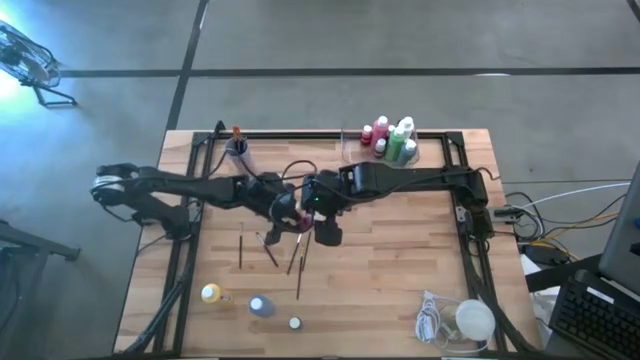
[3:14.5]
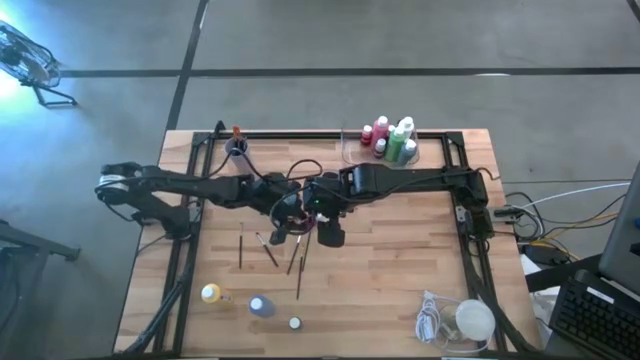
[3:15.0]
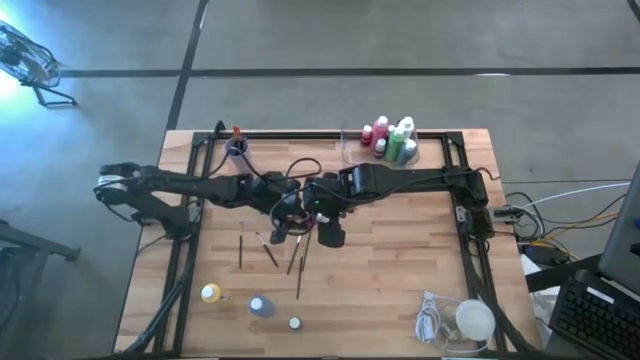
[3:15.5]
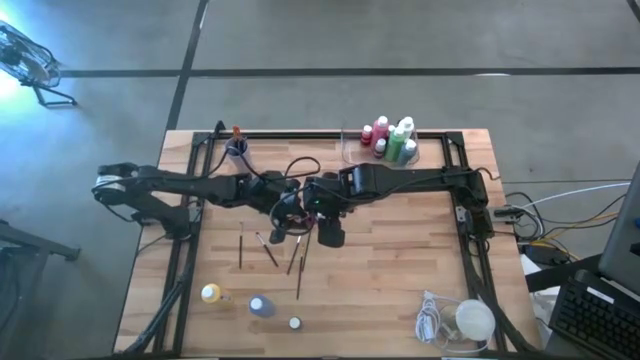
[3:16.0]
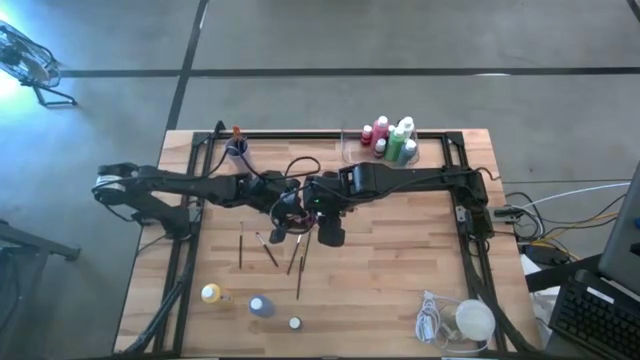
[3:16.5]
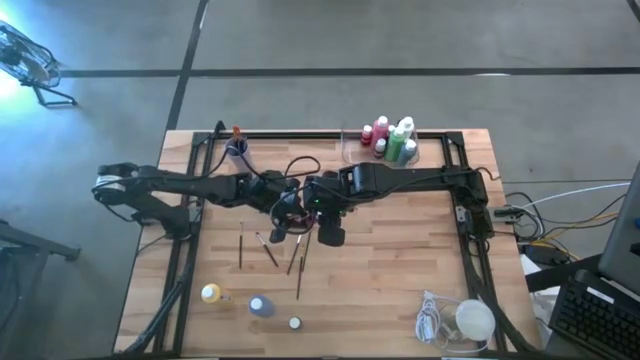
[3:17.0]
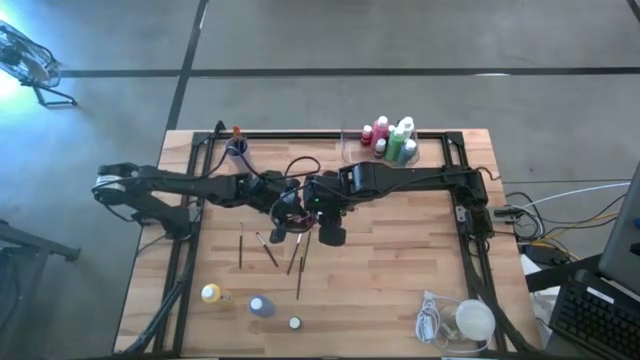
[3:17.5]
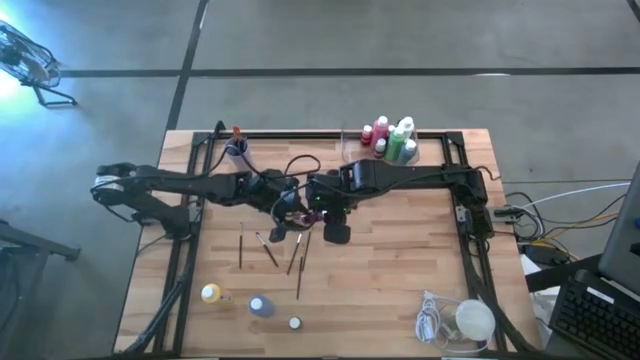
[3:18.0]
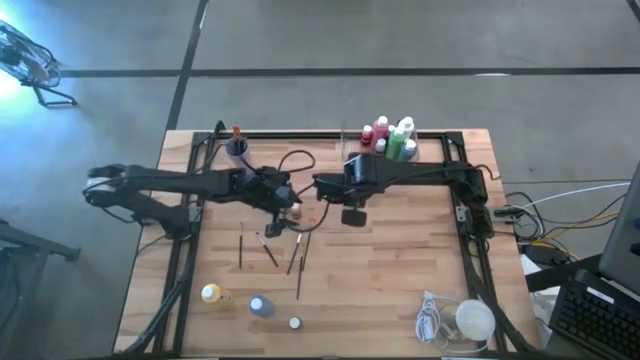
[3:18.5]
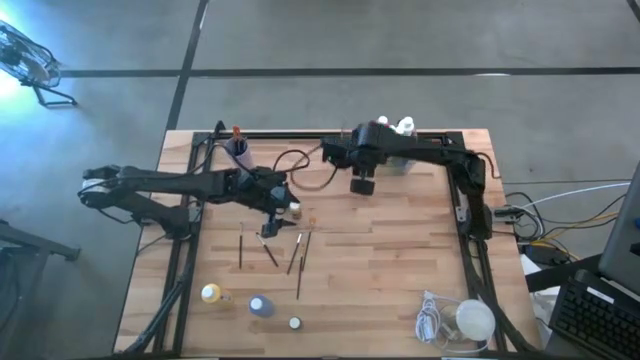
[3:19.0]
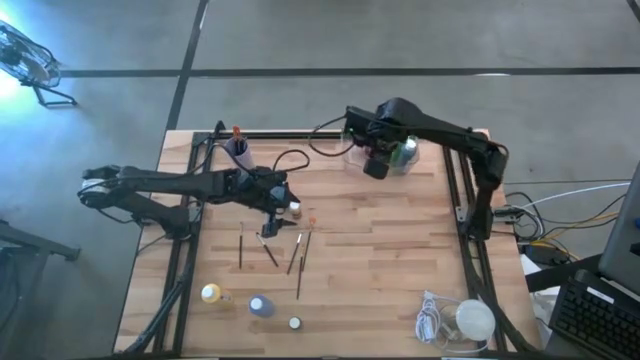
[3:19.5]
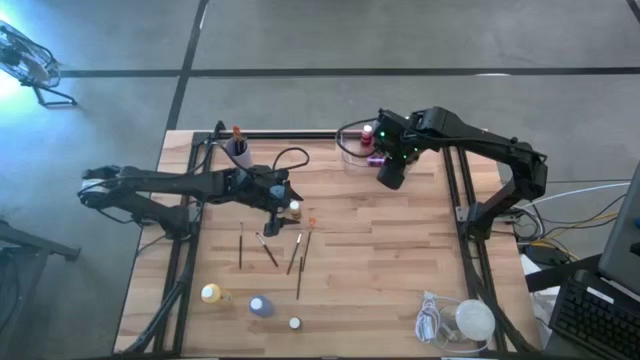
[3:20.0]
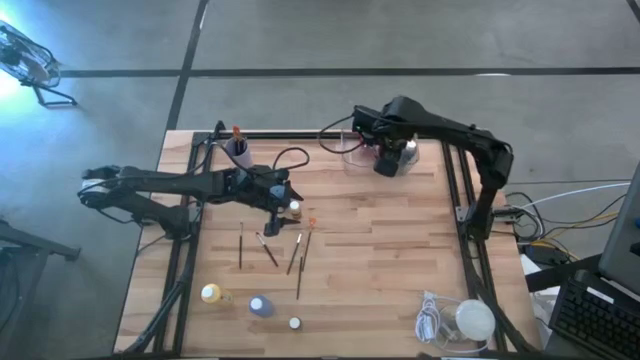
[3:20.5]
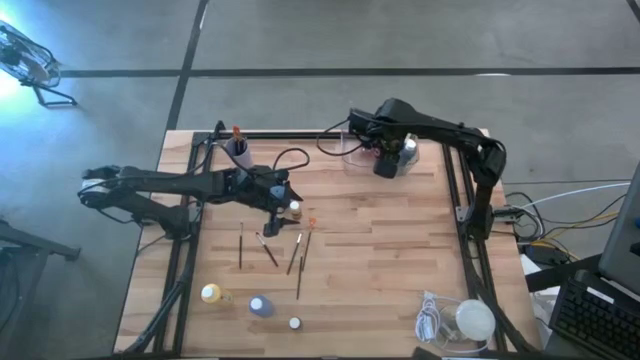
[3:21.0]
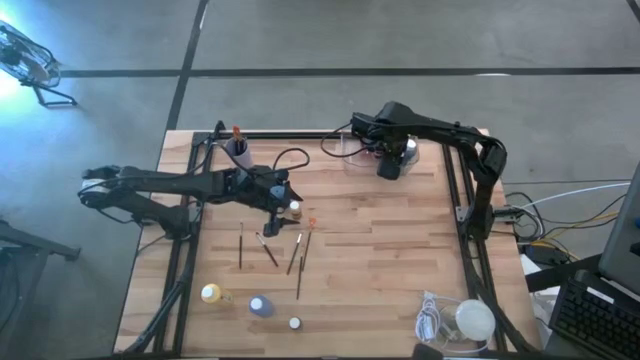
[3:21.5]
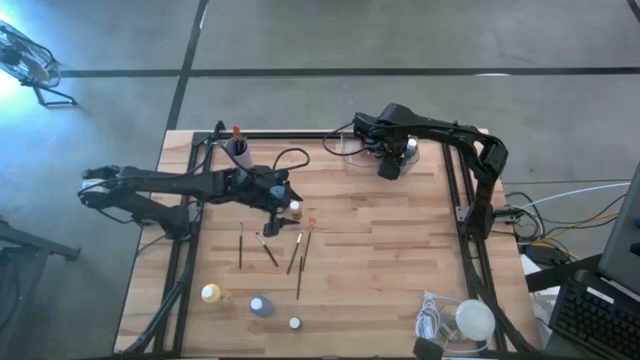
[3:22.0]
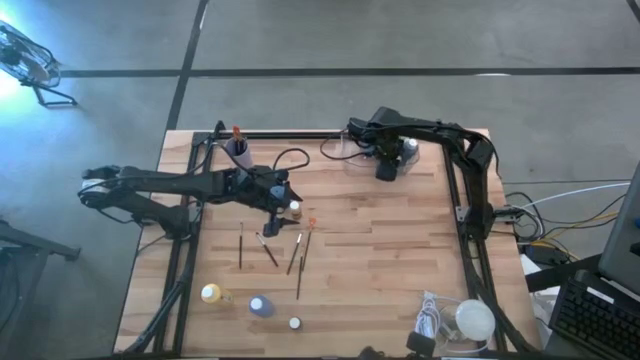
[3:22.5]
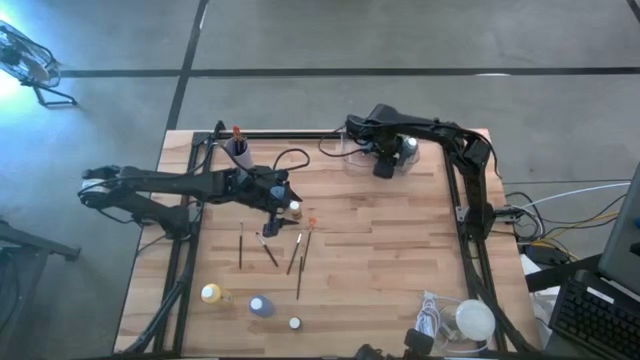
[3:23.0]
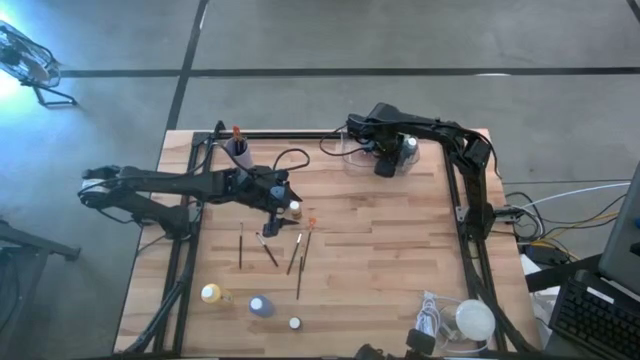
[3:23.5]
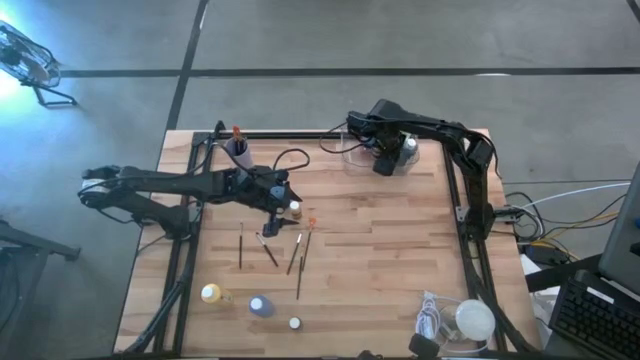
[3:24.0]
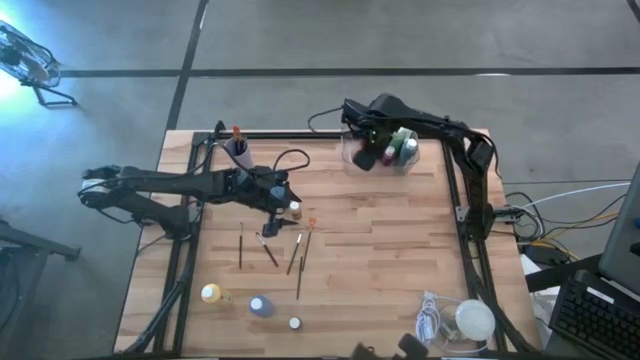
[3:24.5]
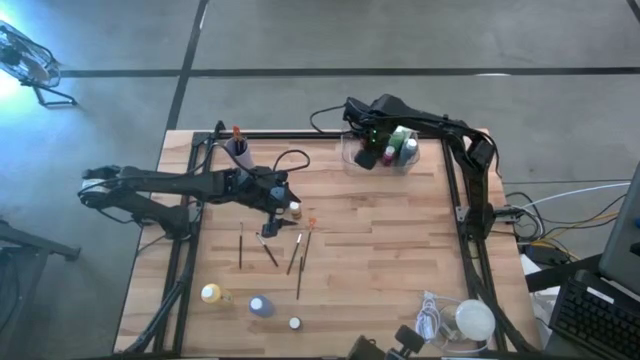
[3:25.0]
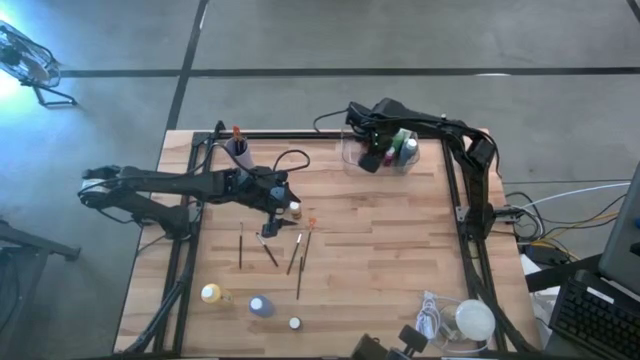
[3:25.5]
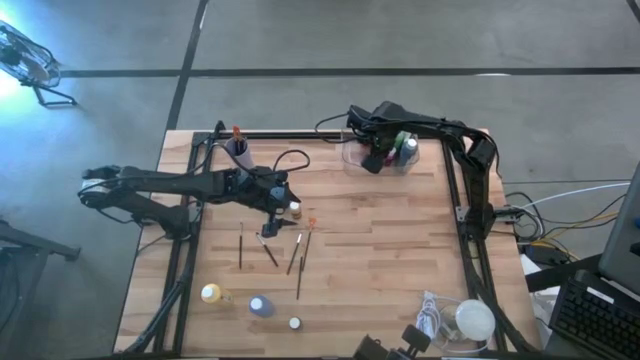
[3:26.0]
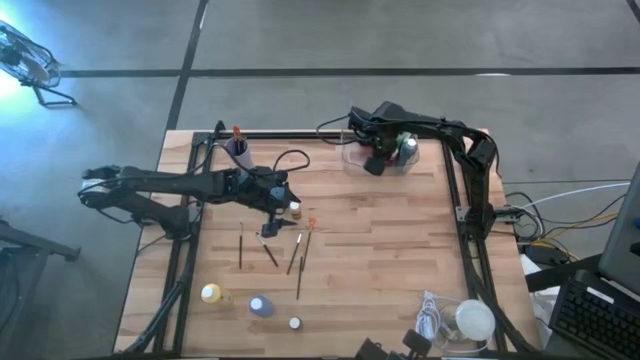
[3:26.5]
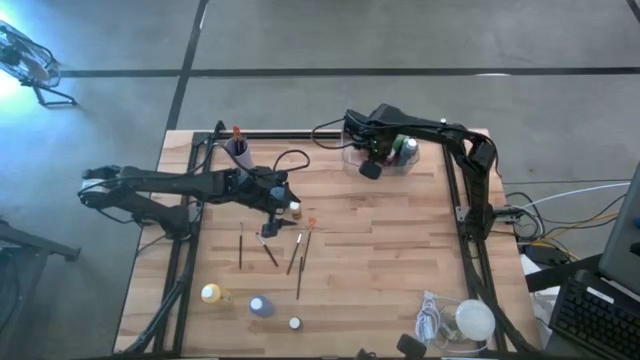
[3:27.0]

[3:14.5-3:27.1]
Task: Pick & Place Paint Supplies
Put the pink paint bottle into the transparent bin

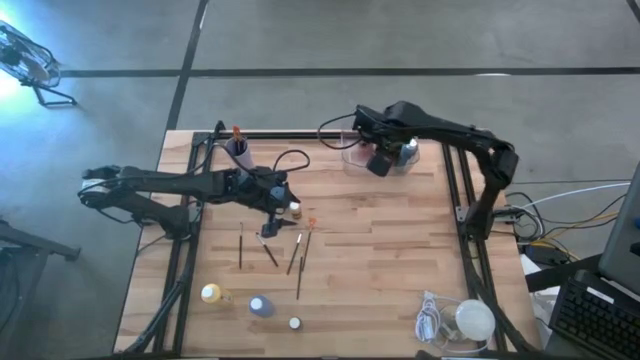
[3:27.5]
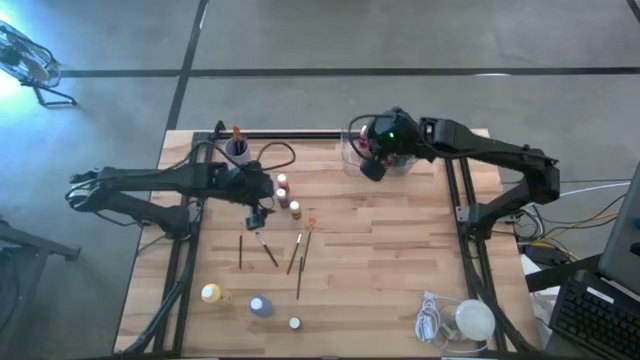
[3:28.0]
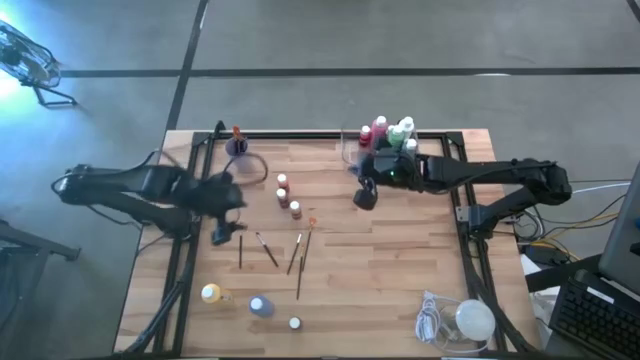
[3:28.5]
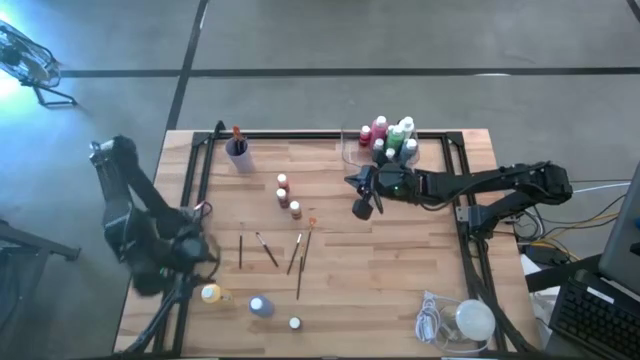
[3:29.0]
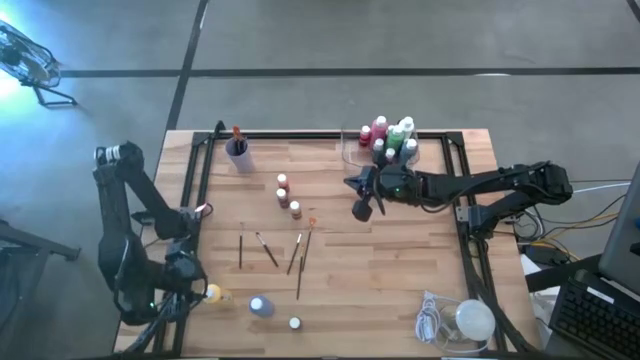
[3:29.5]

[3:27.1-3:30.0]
Put the yellow paint bottle into the transparent bin

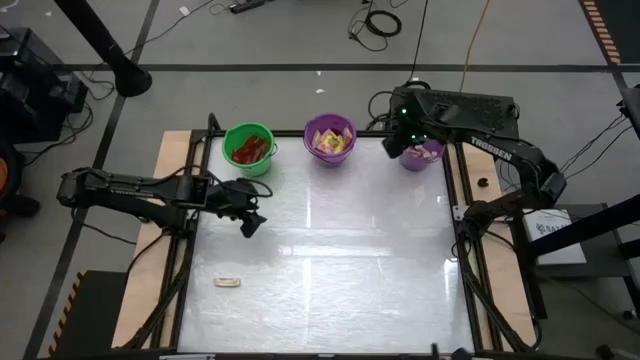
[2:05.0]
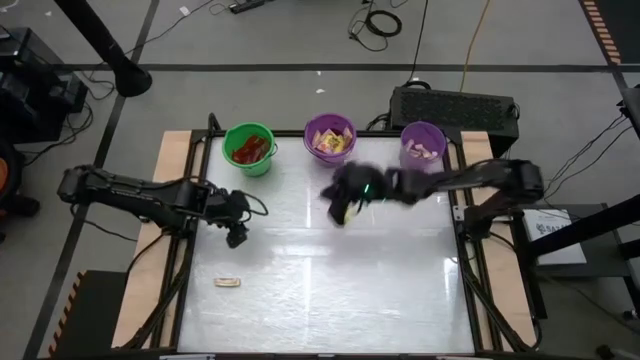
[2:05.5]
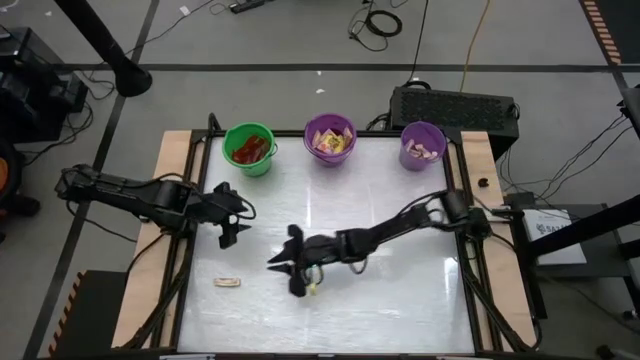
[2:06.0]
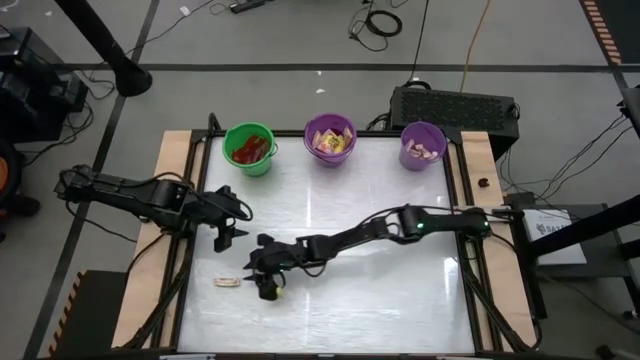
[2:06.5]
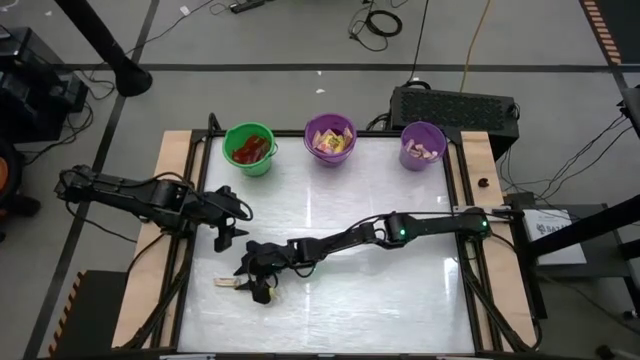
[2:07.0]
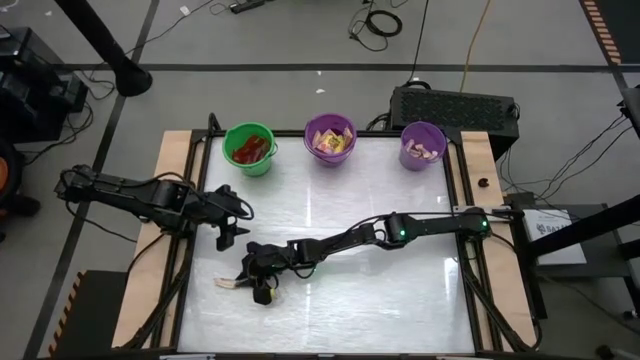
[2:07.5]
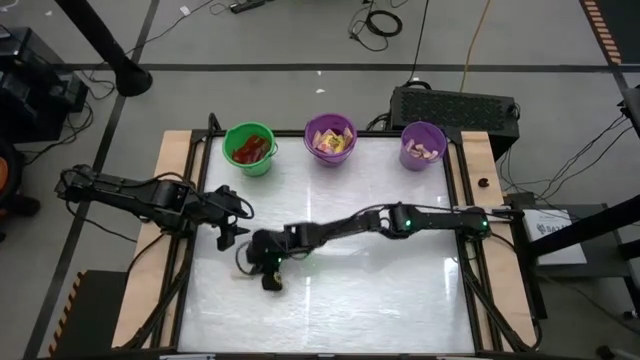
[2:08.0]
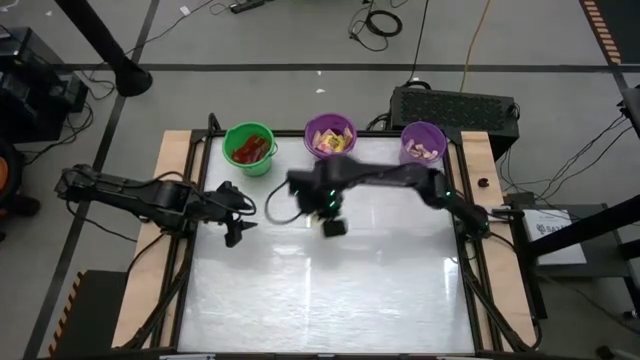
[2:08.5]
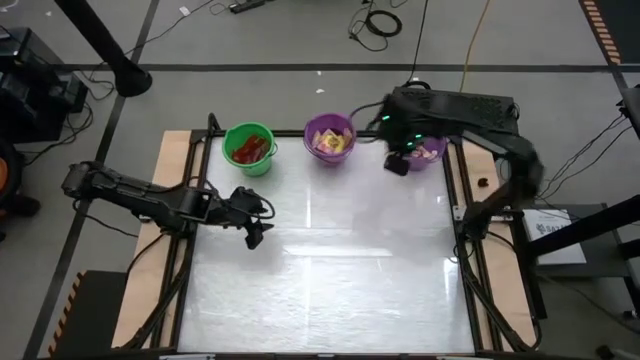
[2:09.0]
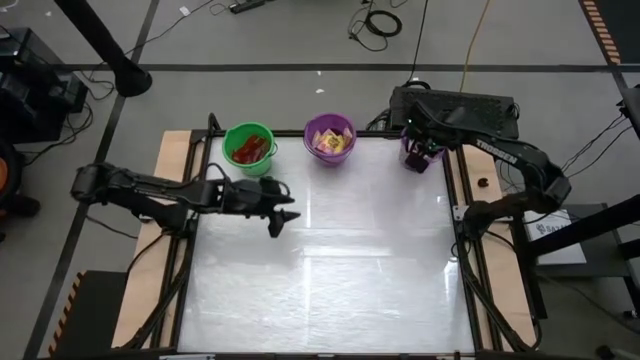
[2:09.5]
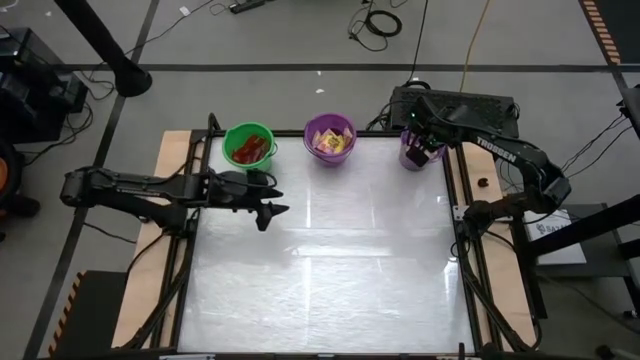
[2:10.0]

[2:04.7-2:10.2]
Task: Sort candy by brand, put in halloween buckets
Put the white candy pack in the right purple bucket
